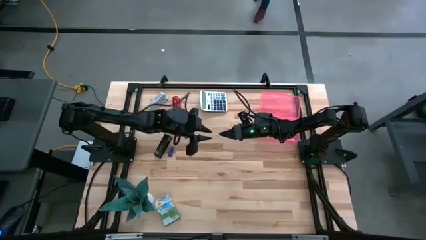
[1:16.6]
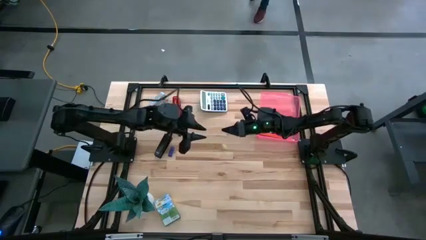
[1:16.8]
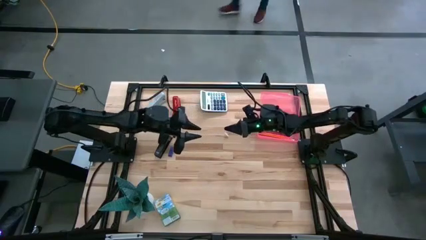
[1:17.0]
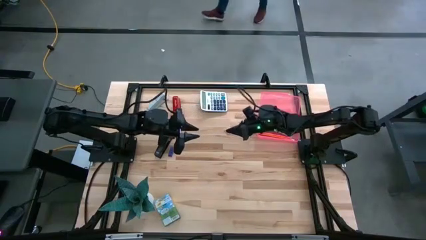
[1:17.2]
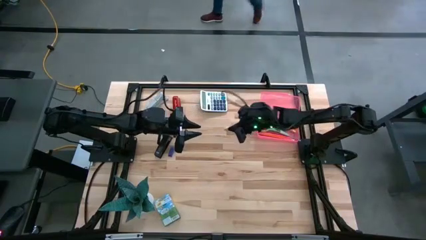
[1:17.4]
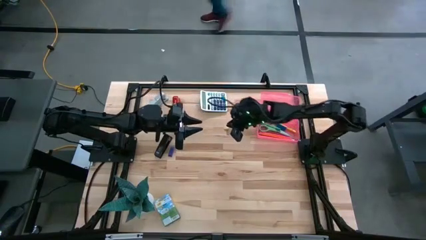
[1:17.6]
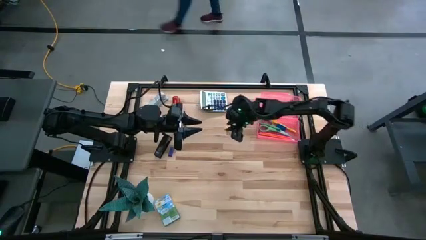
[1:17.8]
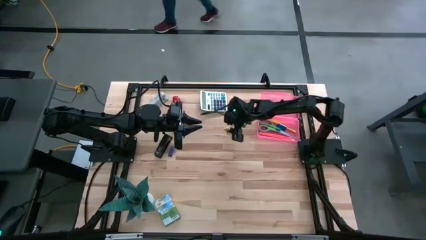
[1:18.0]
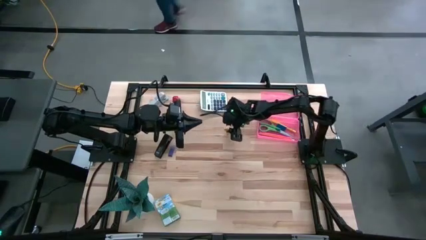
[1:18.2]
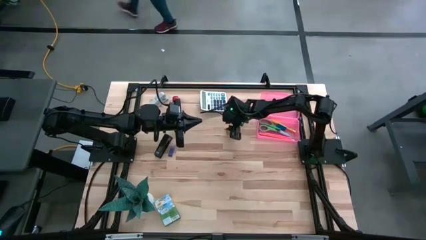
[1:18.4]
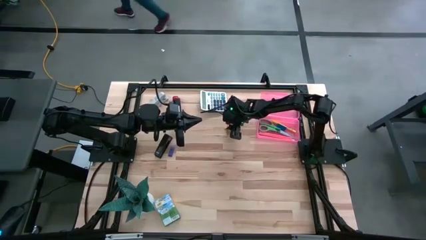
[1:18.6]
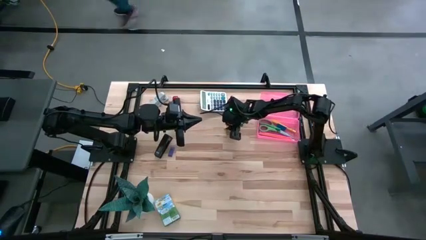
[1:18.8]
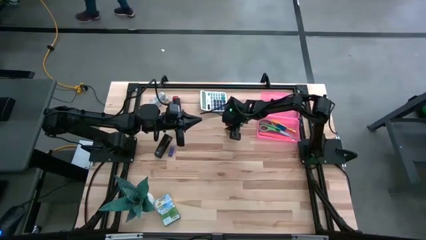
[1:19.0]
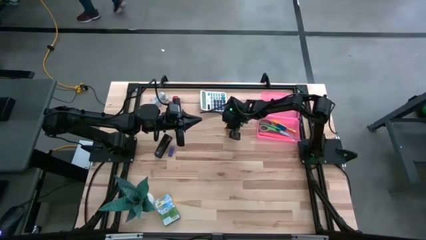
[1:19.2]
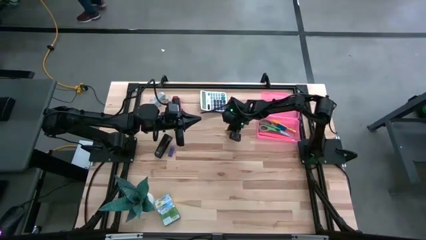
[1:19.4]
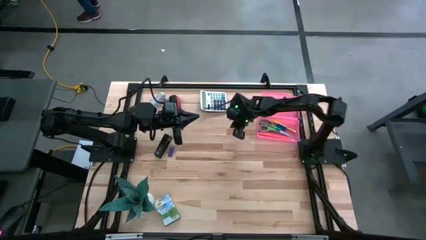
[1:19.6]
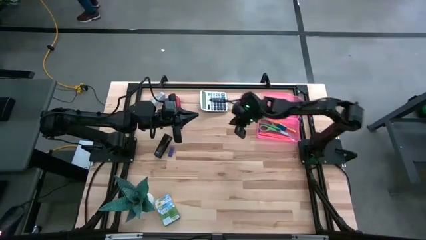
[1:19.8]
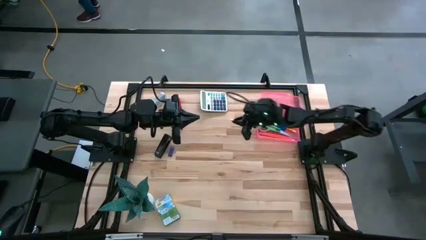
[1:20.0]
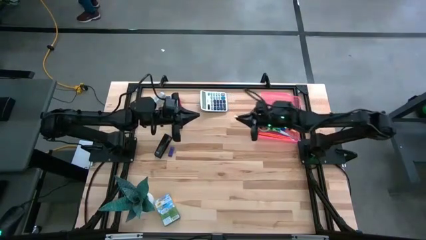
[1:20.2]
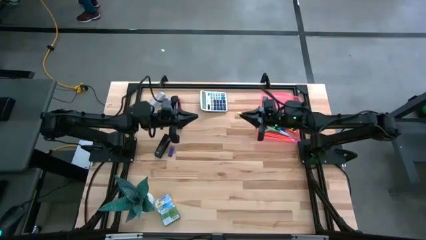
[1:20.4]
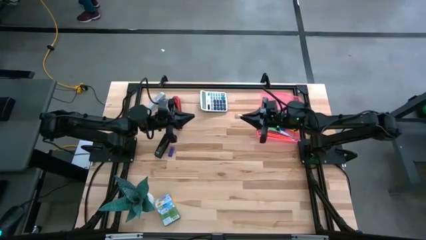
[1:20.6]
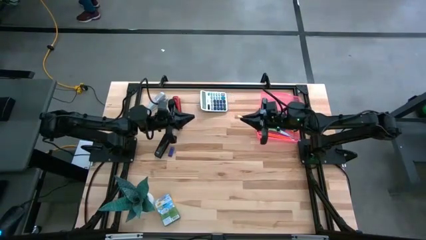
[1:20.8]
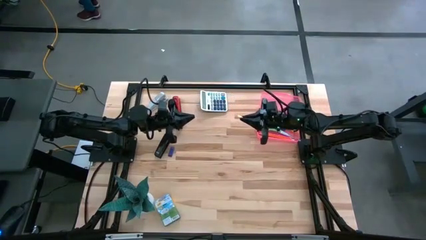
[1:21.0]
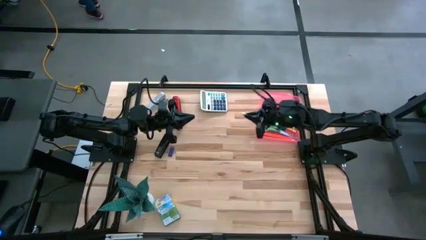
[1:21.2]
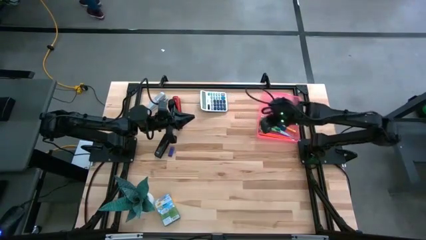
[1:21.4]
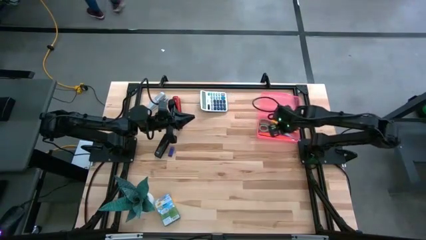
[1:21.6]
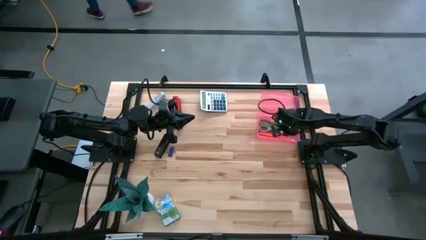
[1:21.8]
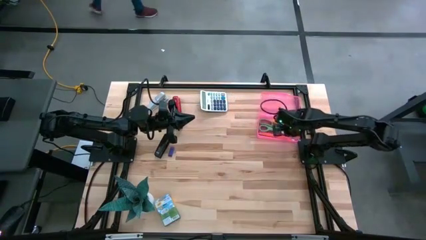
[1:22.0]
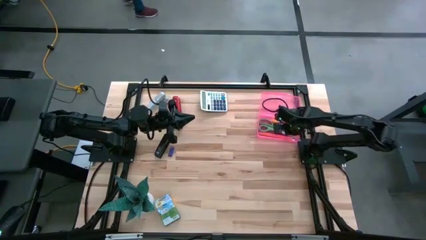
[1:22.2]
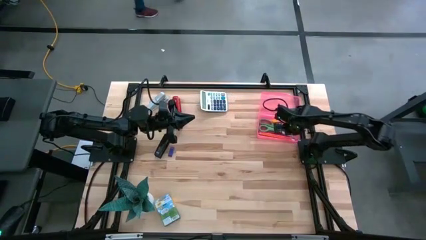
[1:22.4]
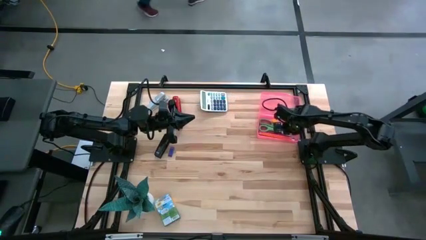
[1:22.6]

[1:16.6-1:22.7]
Task: Pack school essentials
Put the yellow eraser into the pink supply box

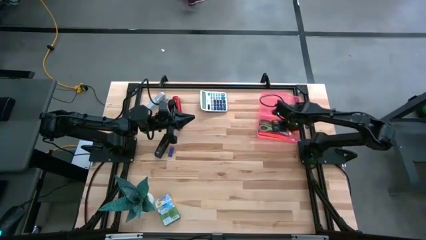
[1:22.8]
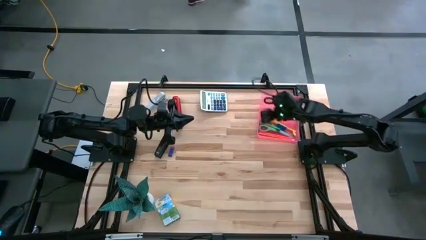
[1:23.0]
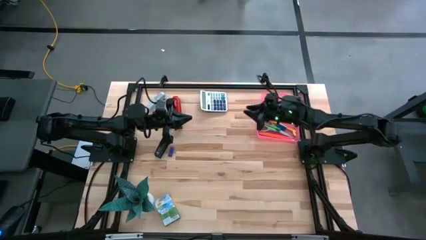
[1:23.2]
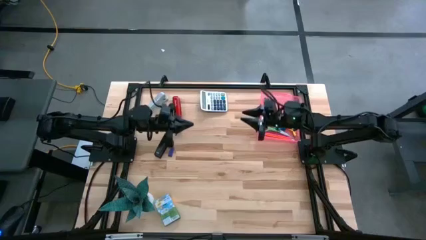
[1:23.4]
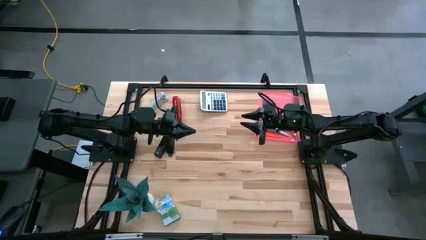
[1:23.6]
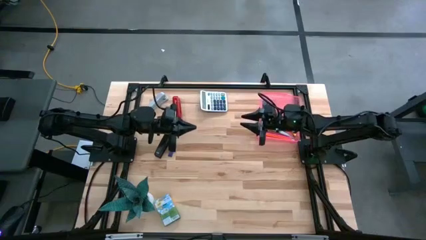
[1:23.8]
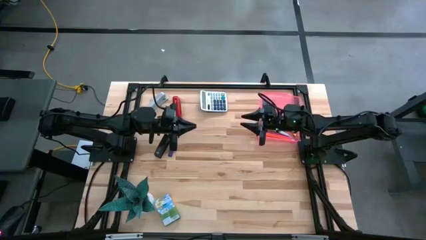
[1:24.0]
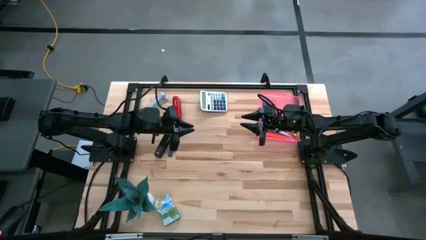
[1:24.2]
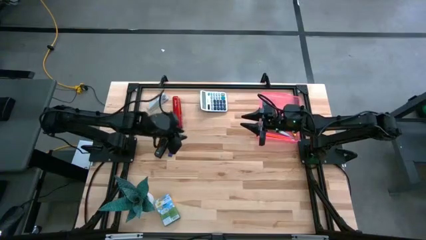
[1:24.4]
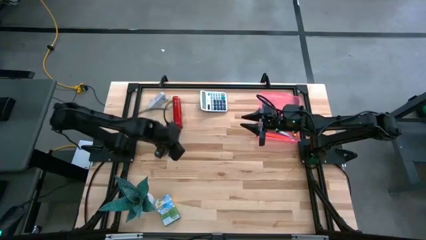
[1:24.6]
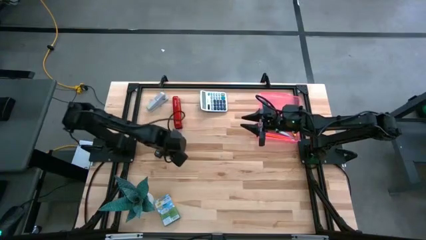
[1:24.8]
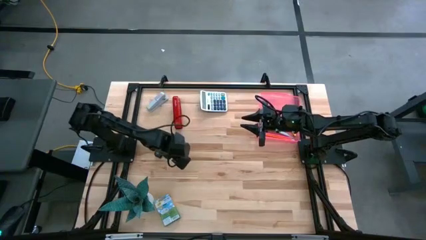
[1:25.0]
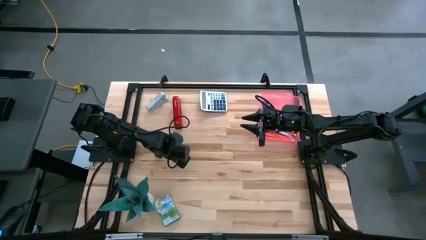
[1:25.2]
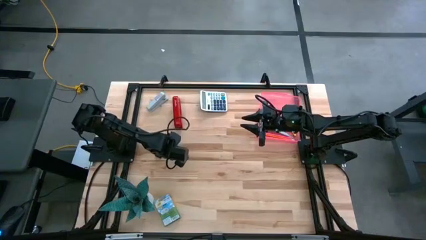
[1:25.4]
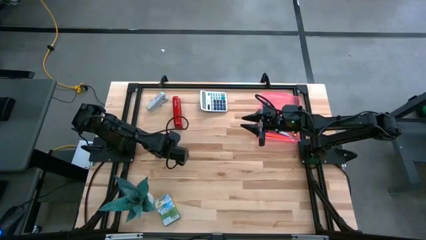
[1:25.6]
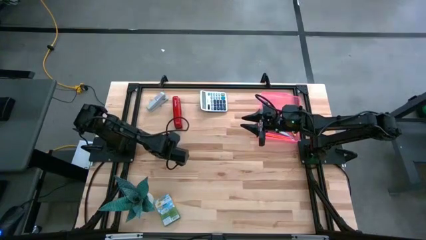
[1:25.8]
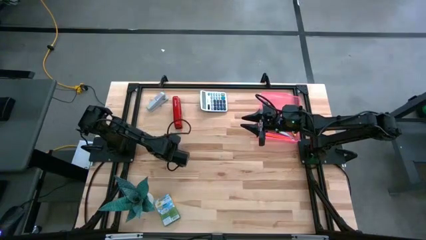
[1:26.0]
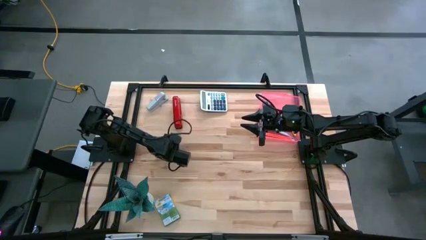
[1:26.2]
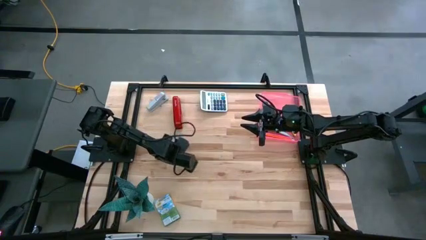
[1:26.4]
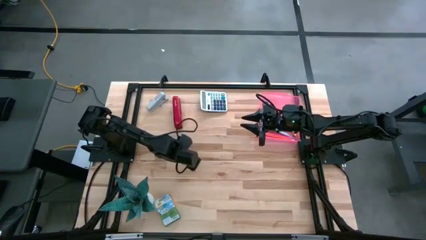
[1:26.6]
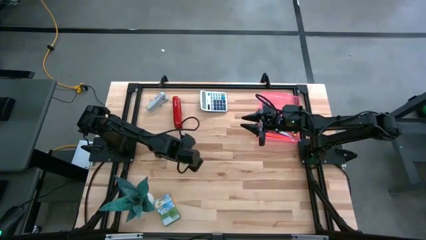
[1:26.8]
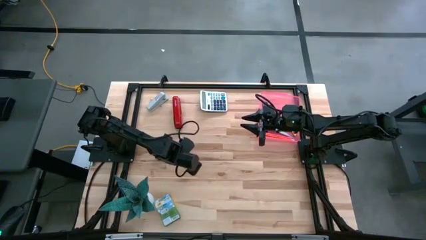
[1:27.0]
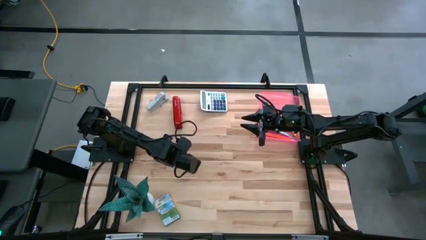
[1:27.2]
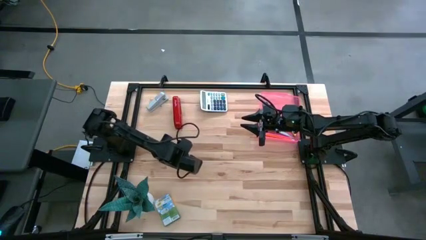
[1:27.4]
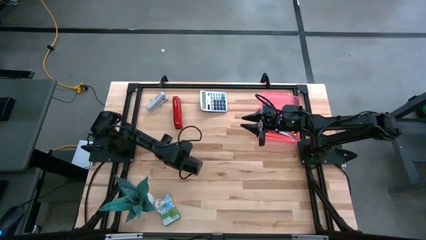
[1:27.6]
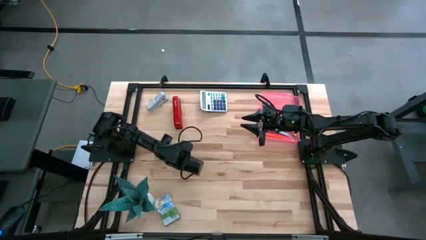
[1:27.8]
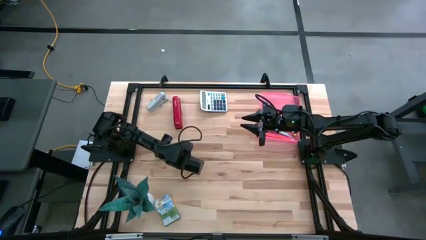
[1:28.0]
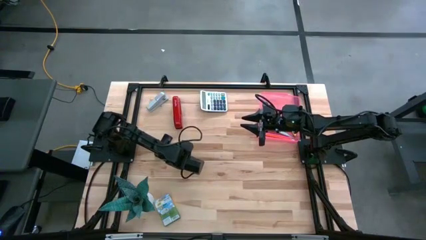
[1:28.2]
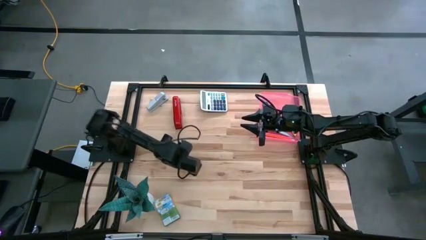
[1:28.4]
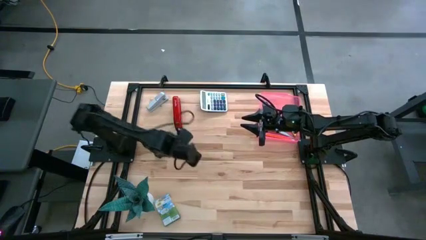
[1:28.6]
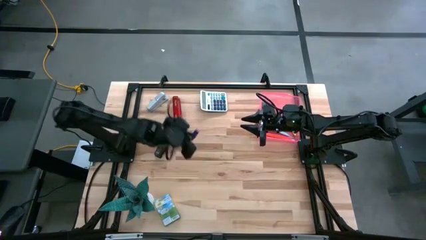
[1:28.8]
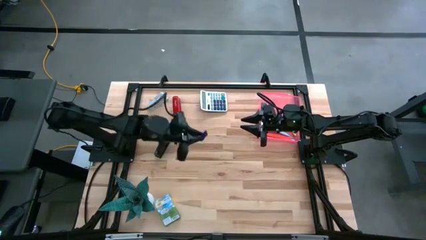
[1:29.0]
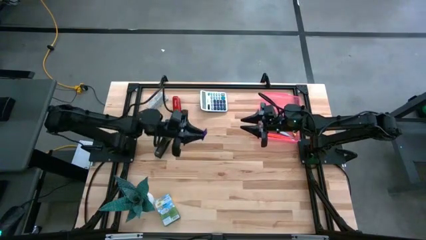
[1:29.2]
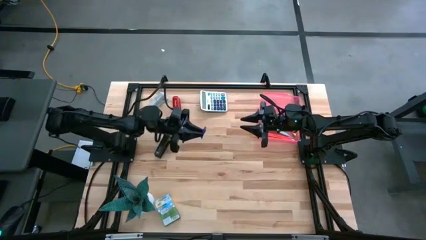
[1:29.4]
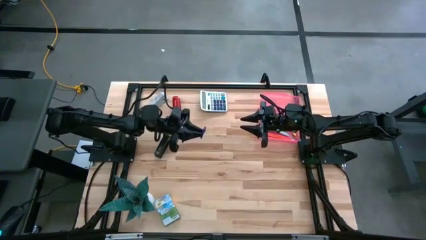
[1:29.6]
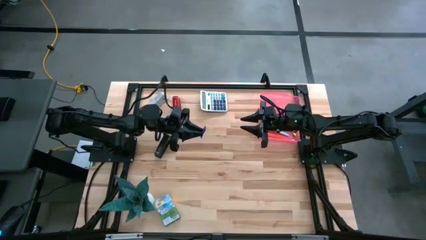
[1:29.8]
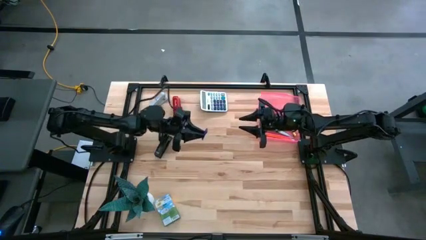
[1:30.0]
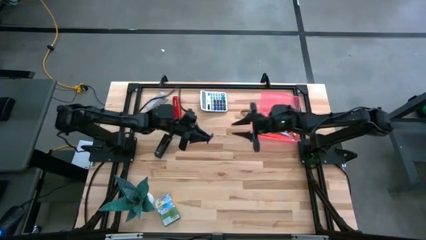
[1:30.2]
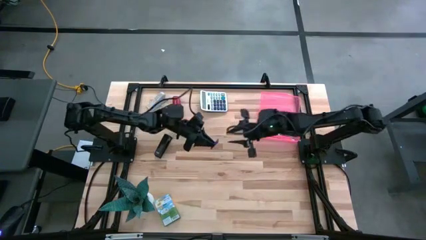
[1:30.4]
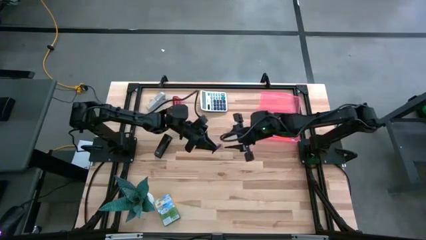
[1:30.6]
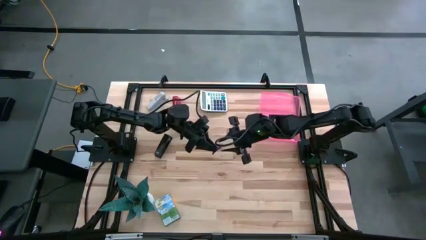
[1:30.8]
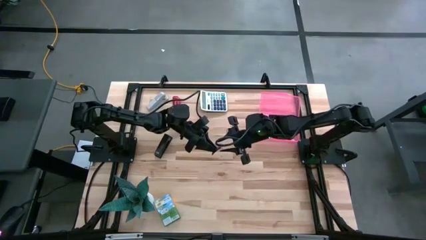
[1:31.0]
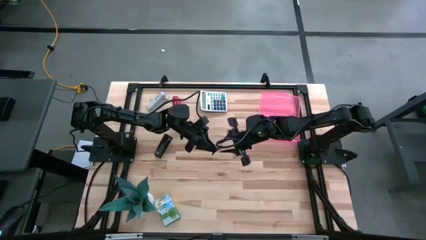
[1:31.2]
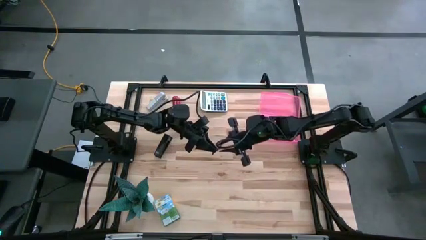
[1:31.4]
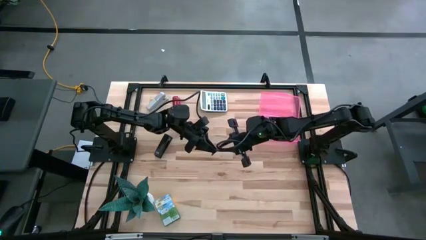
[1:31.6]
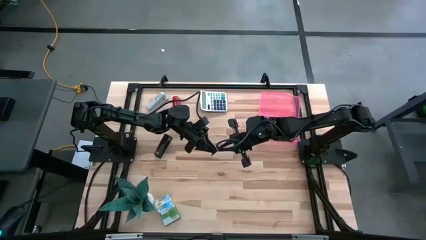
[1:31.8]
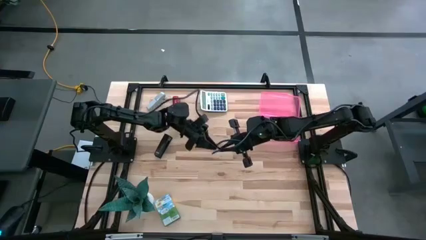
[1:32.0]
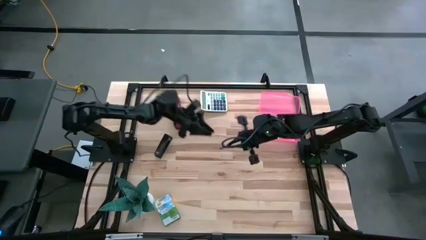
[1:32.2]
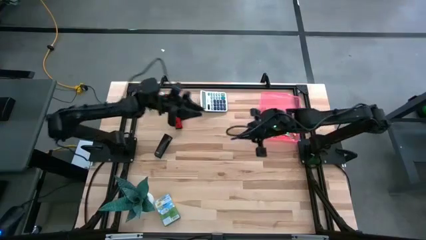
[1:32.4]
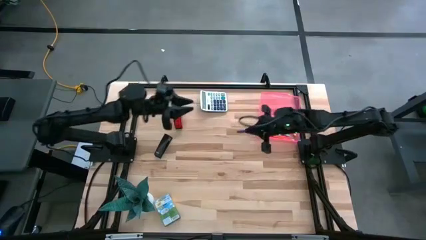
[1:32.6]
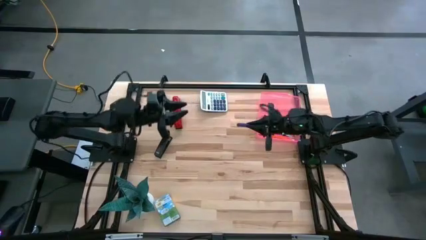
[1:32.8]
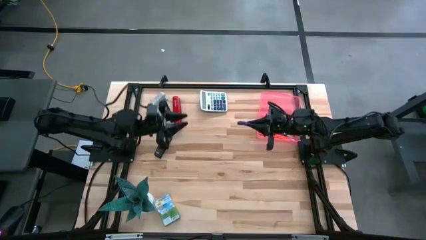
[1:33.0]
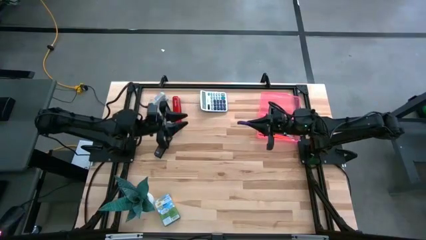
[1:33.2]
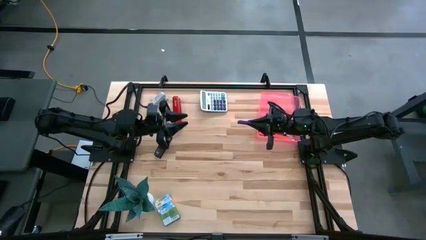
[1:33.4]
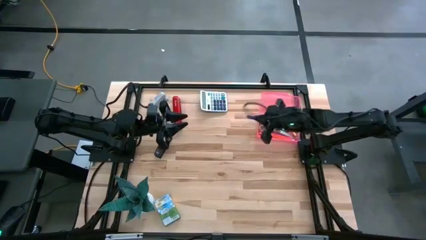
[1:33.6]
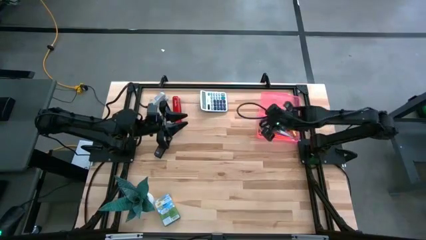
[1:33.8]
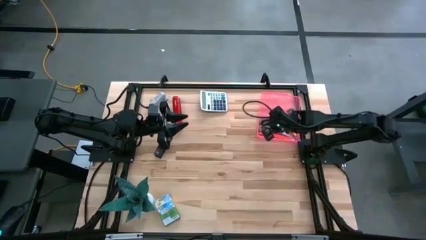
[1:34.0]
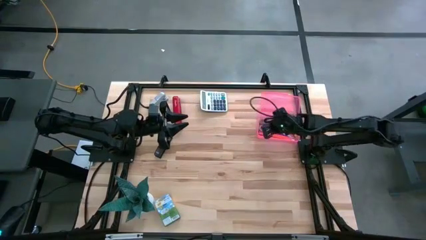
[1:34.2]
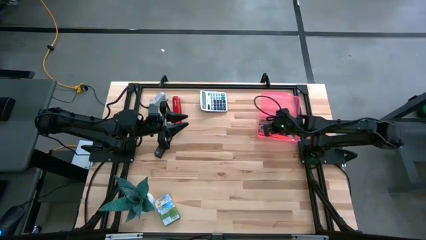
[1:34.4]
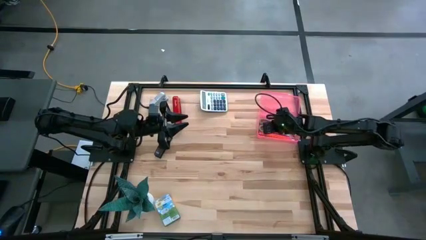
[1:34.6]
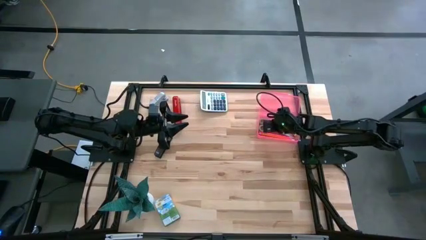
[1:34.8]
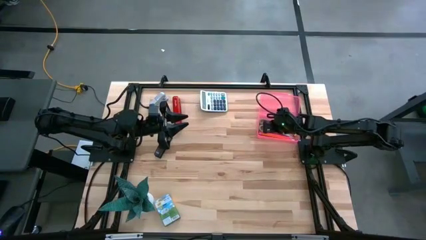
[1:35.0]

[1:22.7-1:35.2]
Put the blue eraser into the pink supply box
